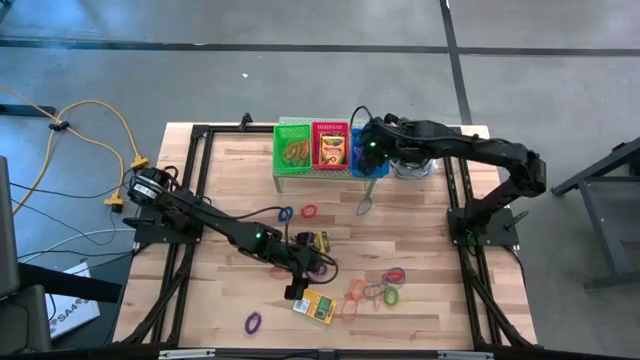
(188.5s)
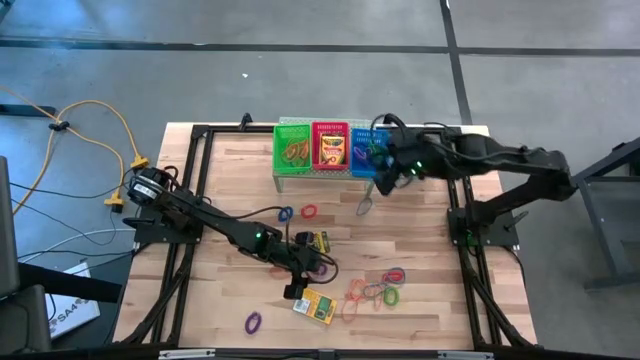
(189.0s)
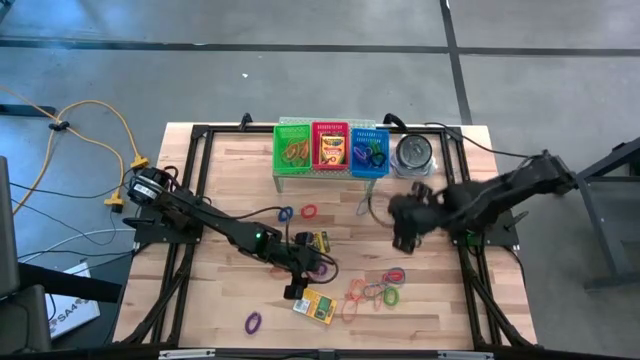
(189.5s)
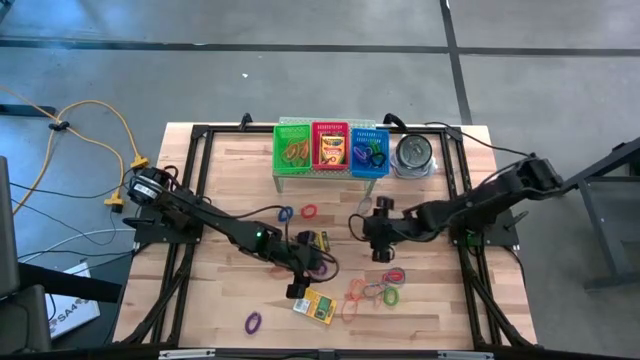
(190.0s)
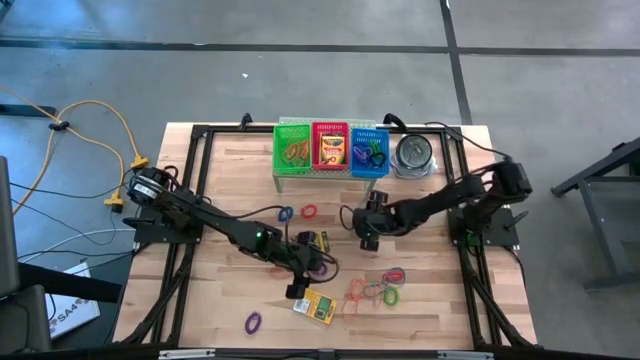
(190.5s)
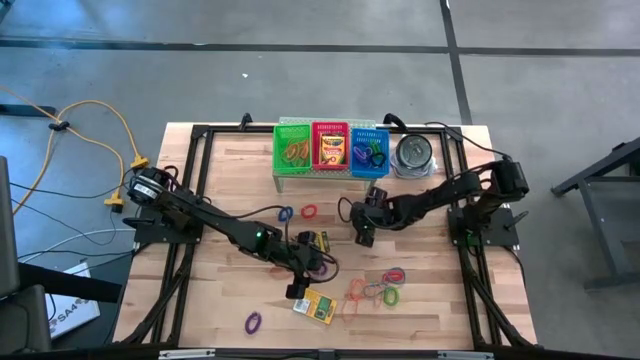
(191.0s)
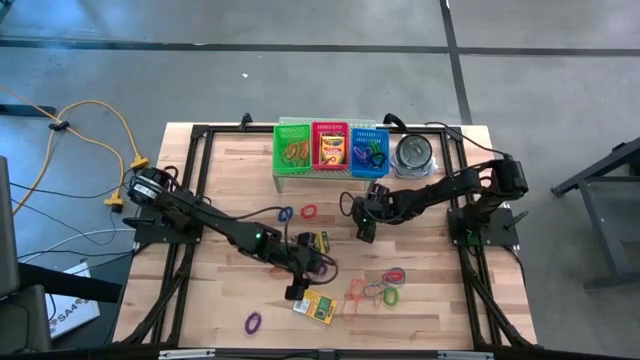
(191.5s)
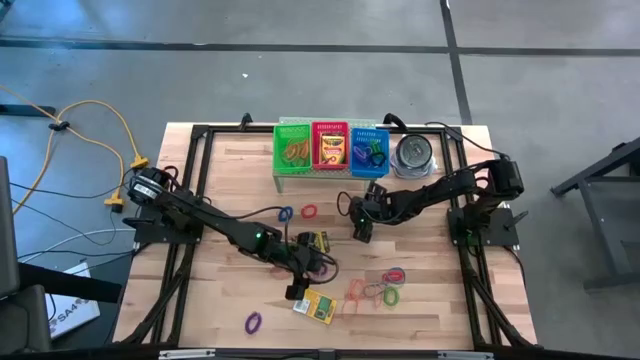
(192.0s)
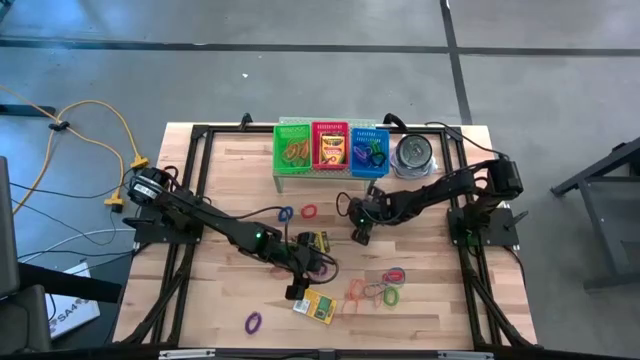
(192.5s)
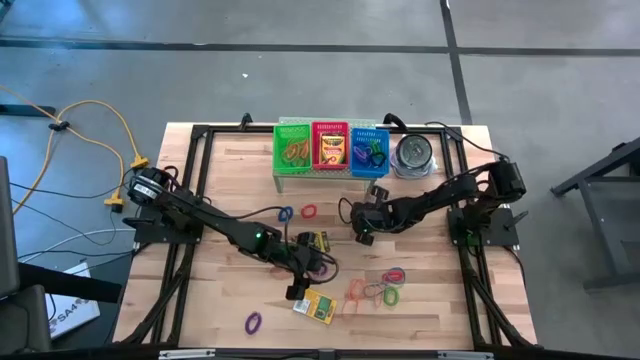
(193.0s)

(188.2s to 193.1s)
Task: Pick & Place Office Desk Supplies
Put the top blue rubber band into the green bin on the shelf

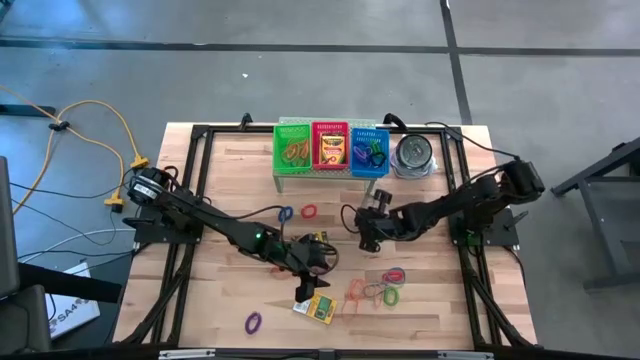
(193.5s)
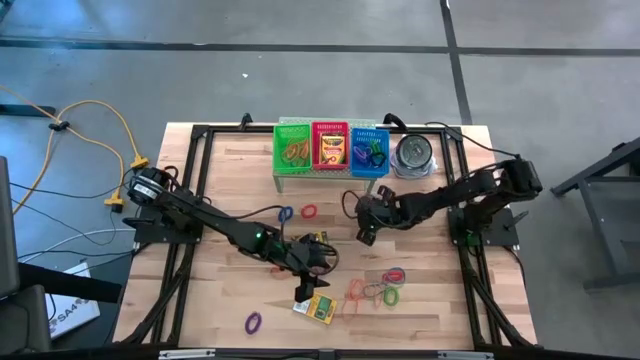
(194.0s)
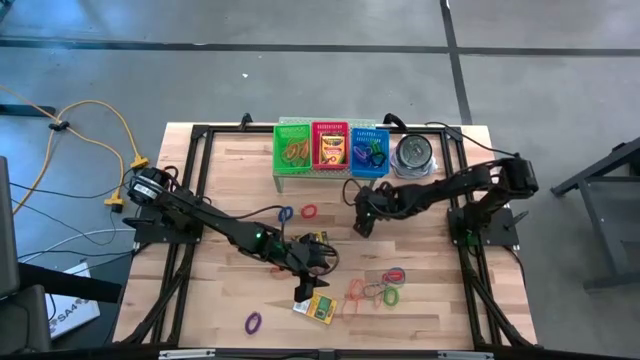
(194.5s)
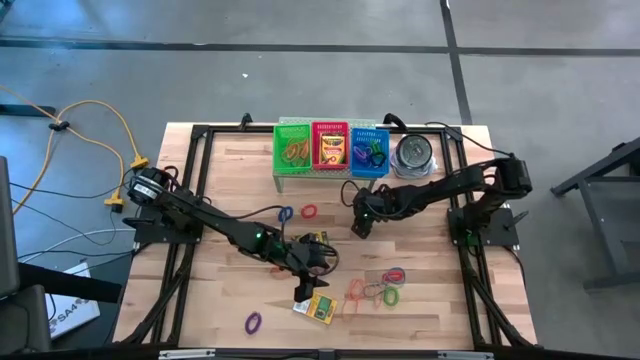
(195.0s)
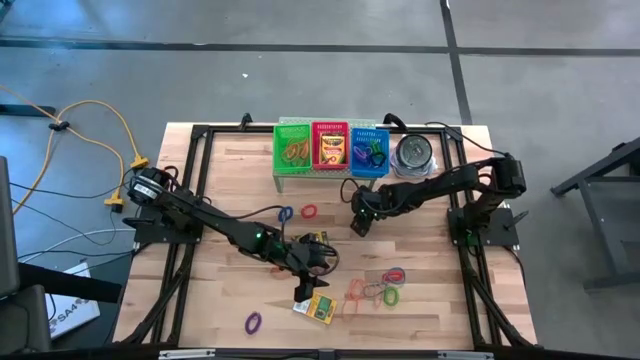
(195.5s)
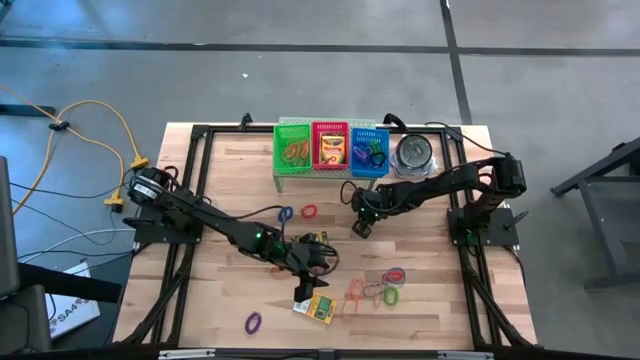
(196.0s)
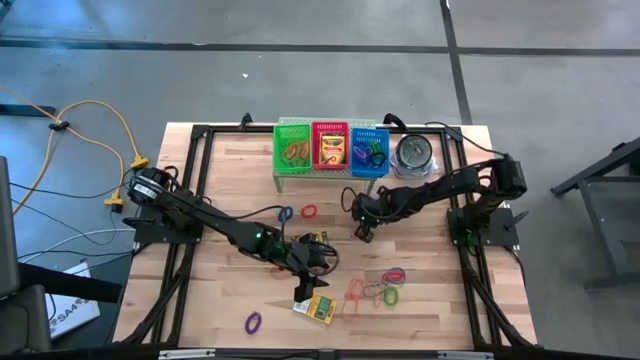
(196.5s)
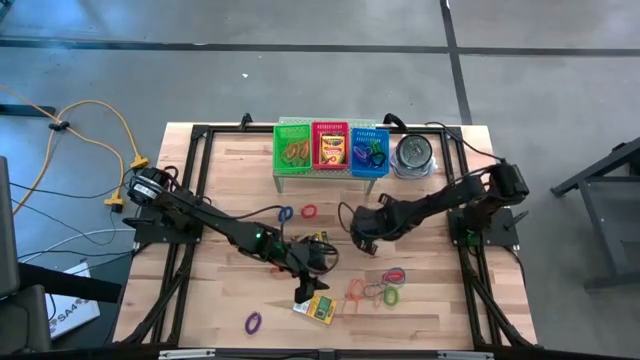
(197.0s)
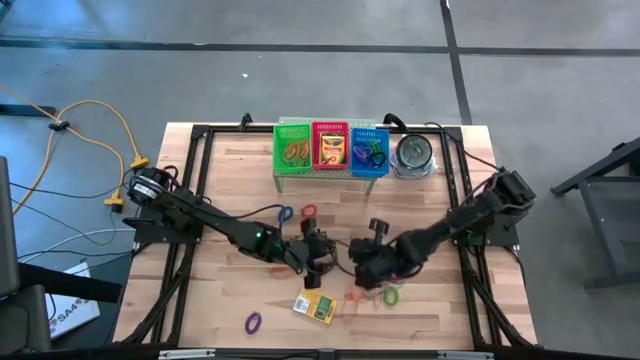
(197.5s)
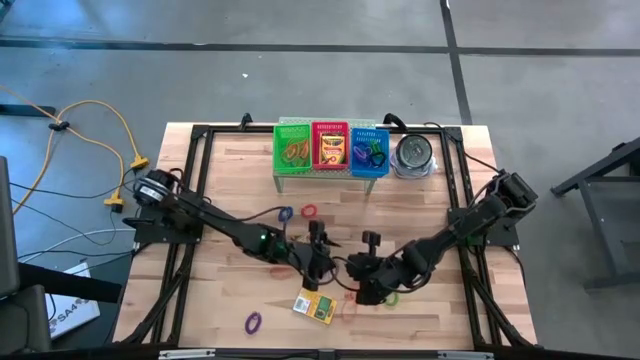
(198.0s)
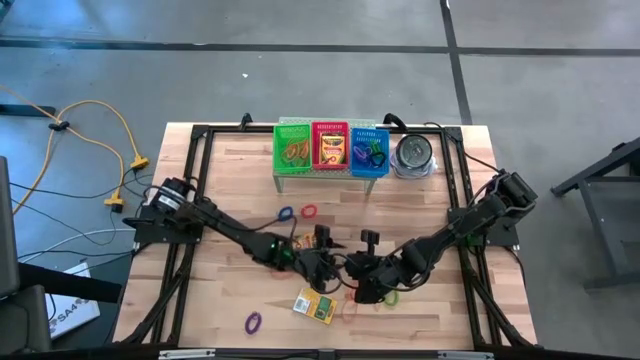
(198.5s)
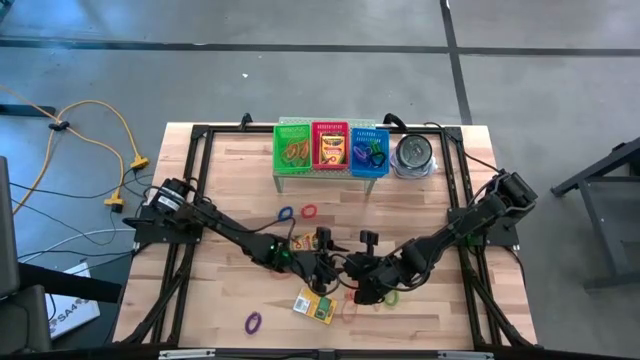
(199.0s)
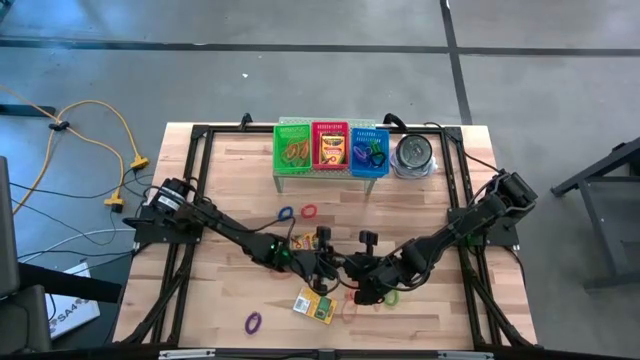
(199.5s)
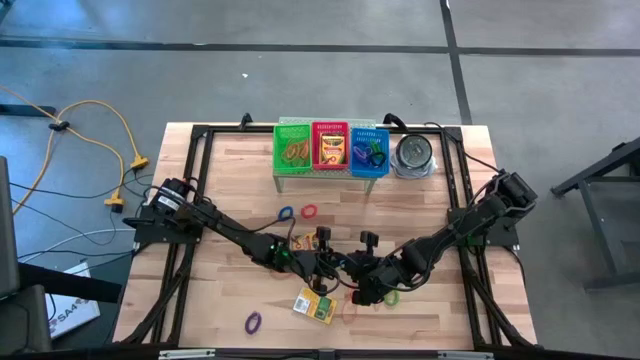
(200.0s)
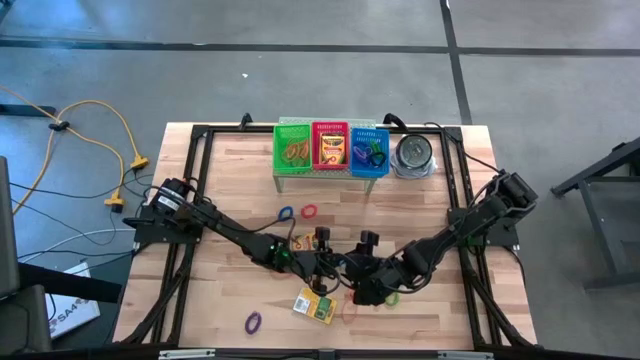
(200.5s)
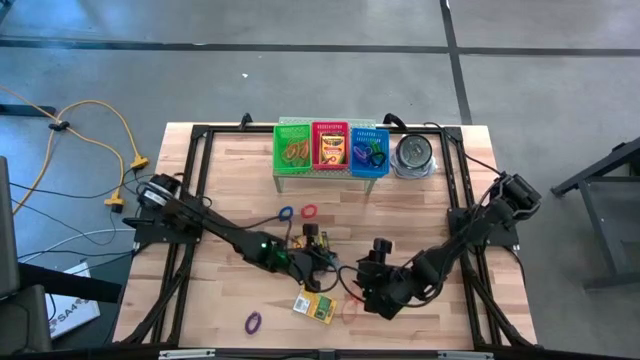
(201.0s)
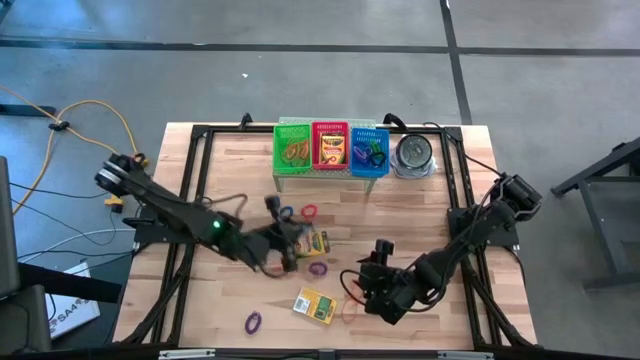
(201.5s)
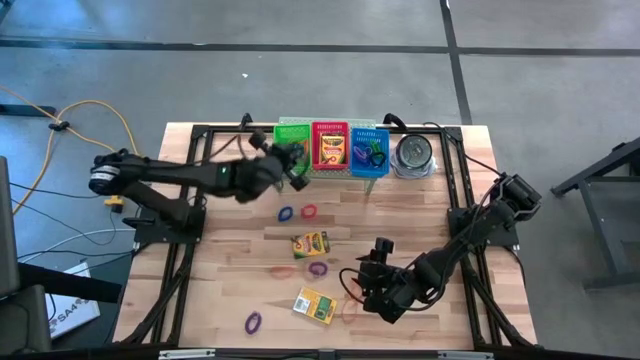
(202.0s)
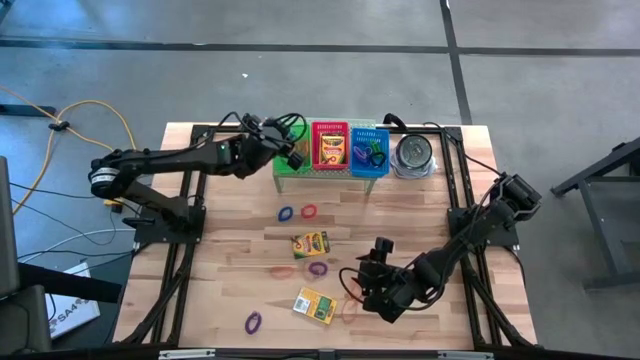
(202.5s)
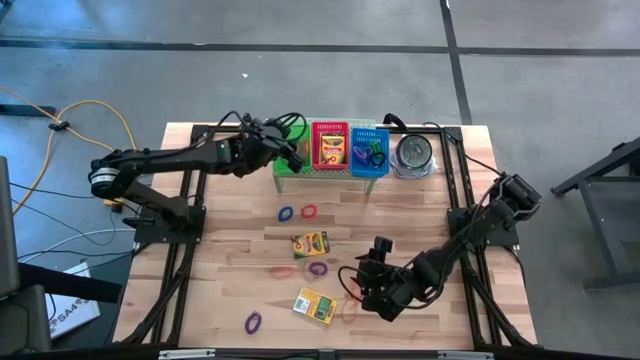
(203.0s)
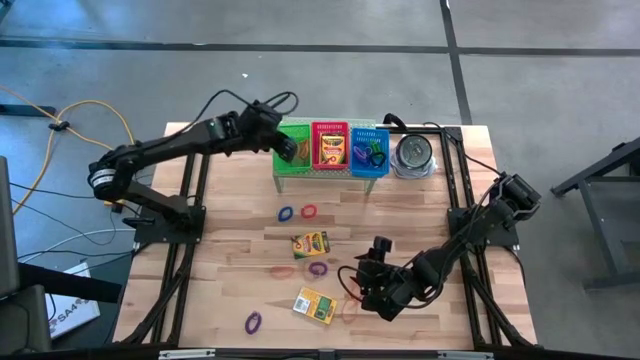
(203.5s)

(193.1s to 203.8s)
Put the top blue rubber band into the green bin on the shelf

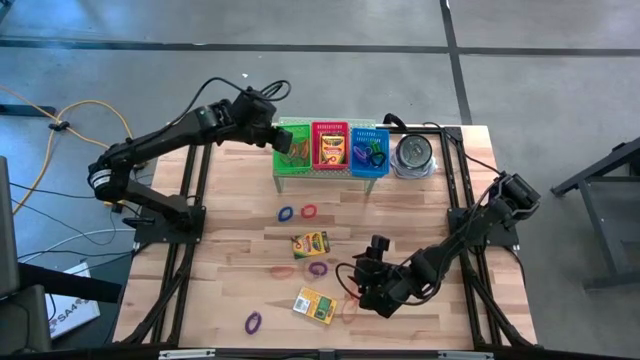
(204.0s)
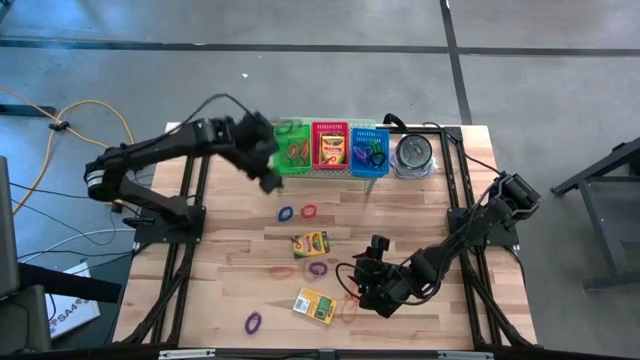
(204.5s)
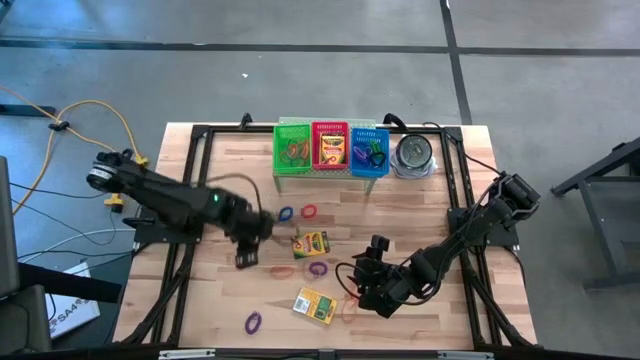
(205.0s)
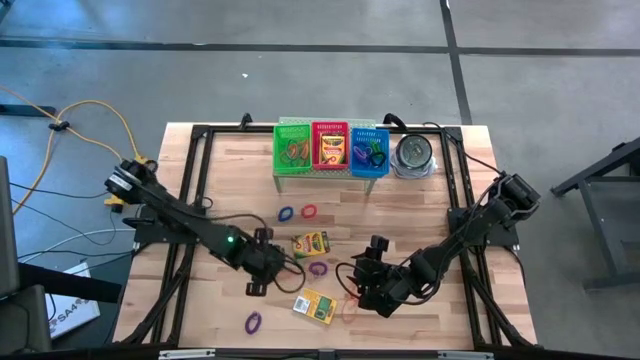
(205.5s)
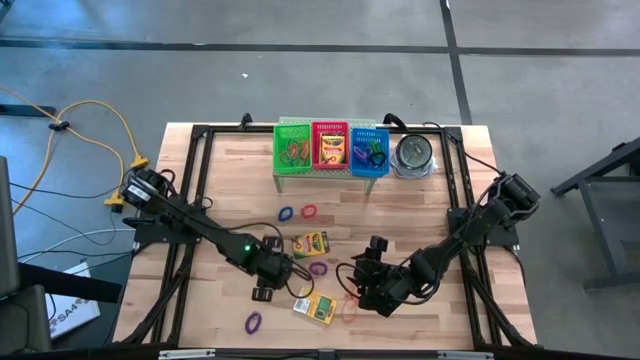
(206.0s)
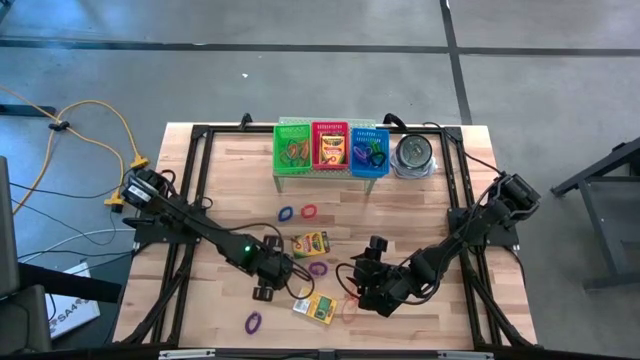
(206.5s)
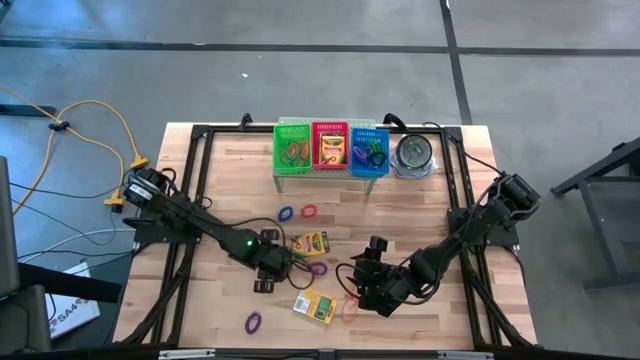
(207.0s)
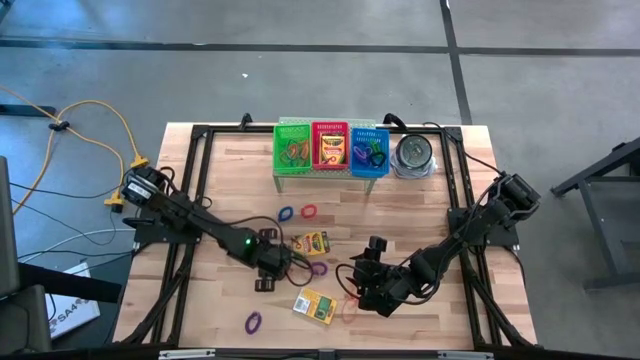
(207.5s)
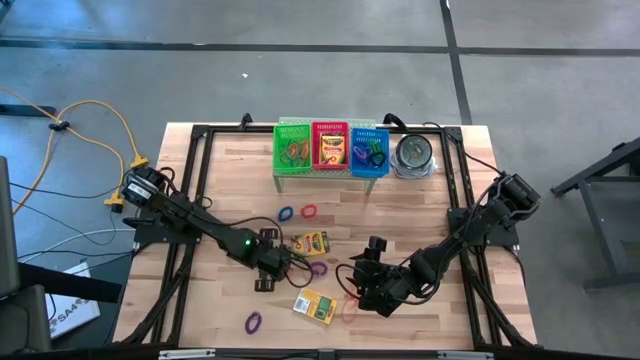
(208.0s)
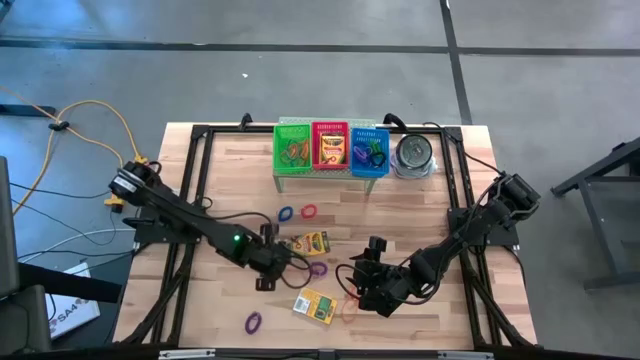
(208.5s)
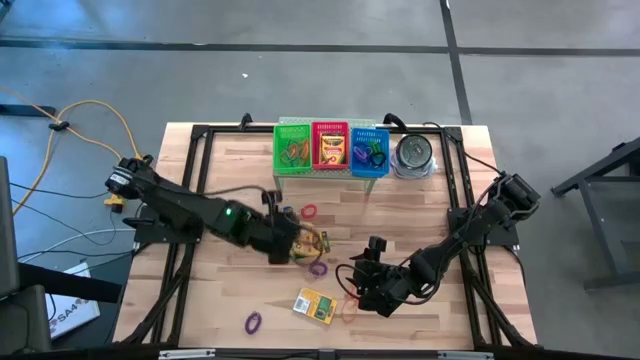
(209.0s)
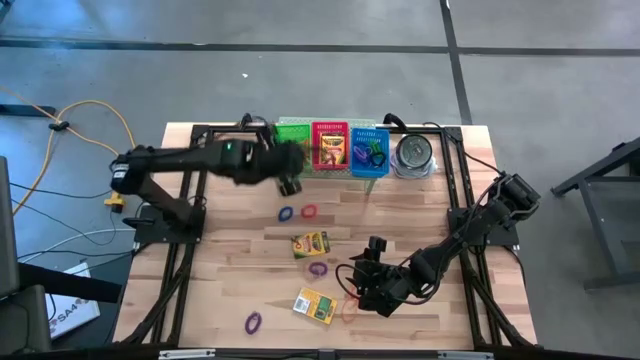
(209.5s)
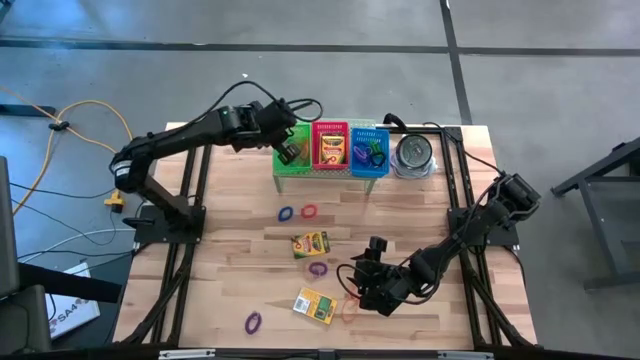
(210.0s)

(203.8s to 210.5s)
Put the orange rubber band into the green bin on the shelf
